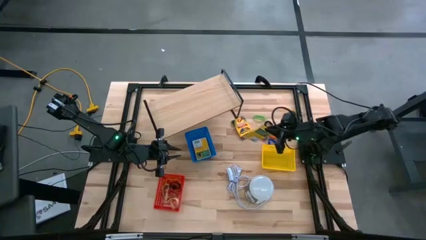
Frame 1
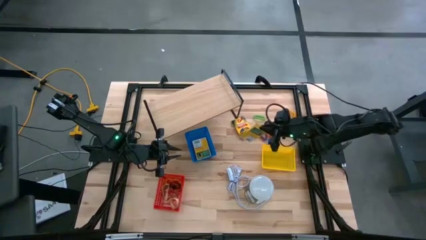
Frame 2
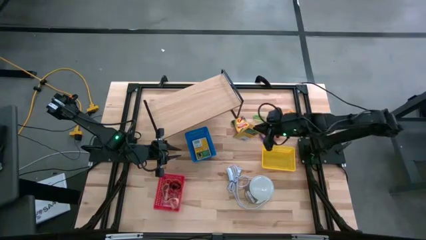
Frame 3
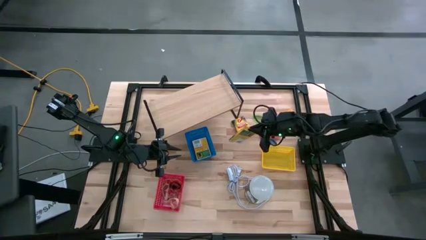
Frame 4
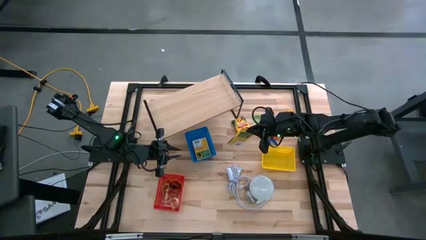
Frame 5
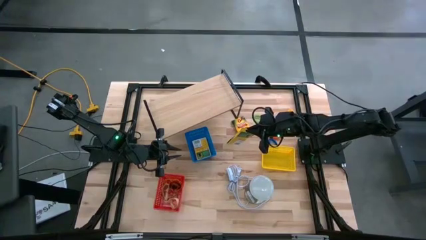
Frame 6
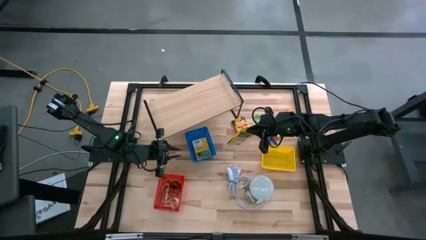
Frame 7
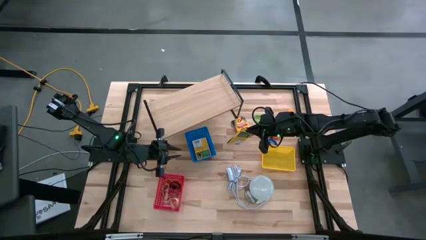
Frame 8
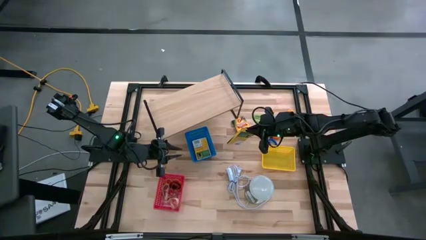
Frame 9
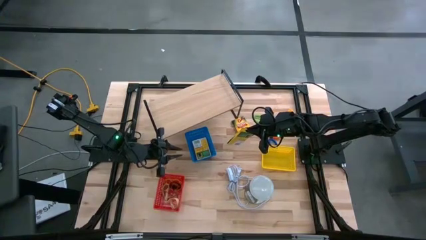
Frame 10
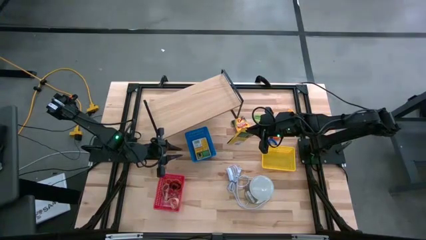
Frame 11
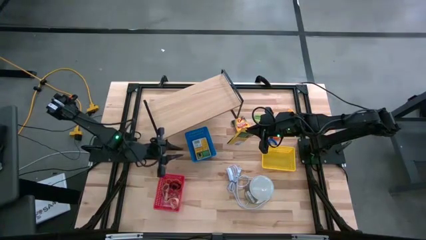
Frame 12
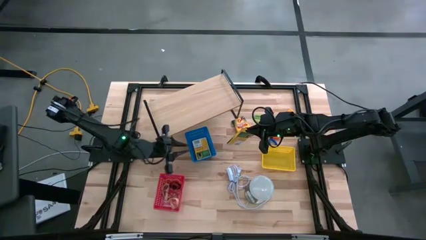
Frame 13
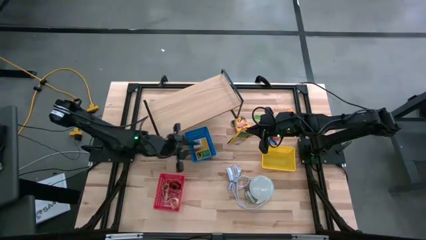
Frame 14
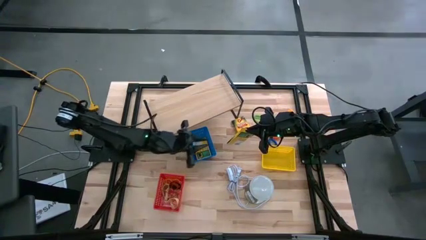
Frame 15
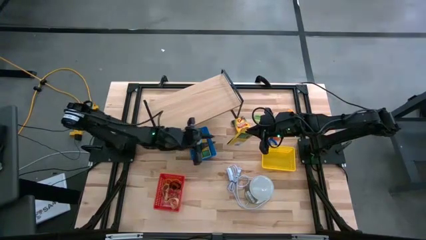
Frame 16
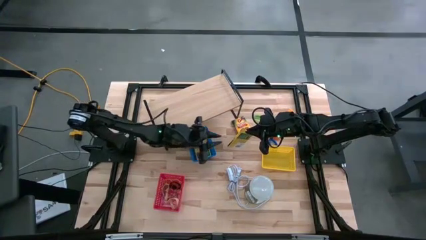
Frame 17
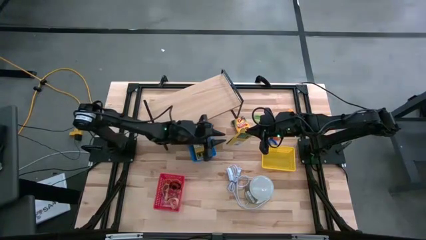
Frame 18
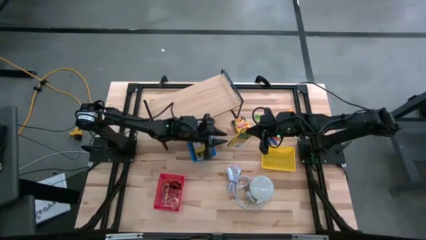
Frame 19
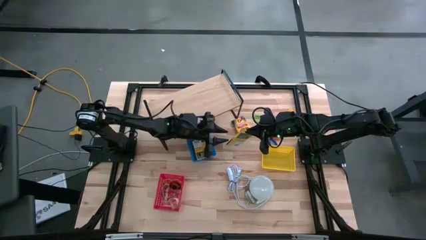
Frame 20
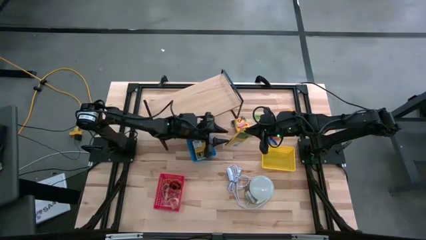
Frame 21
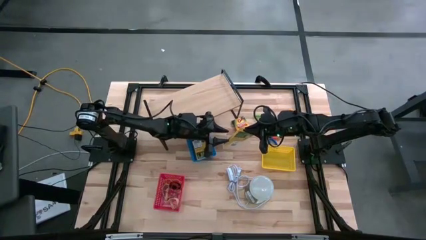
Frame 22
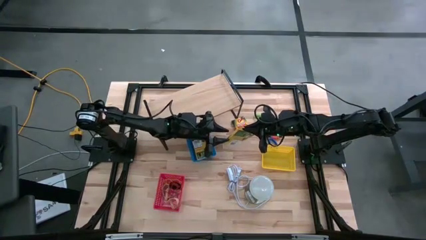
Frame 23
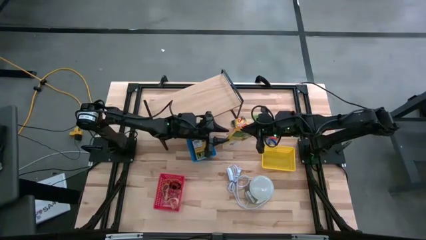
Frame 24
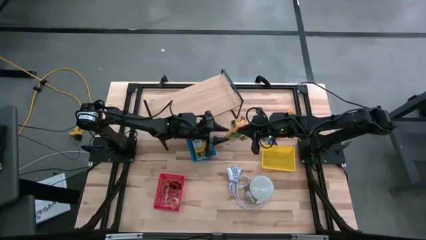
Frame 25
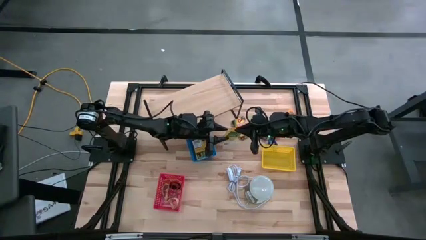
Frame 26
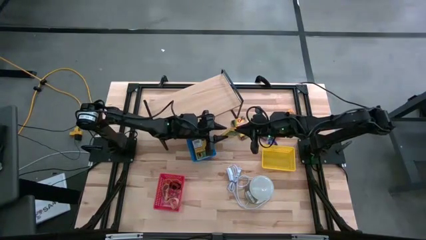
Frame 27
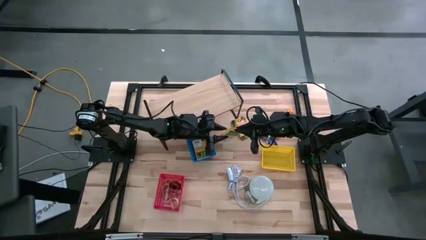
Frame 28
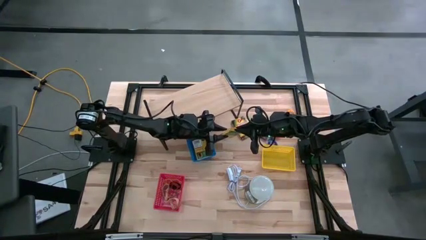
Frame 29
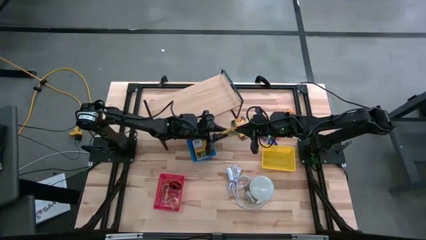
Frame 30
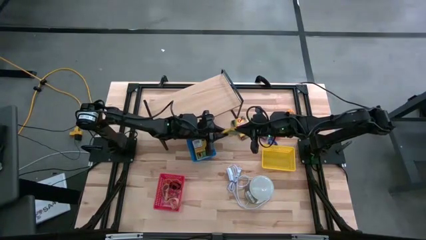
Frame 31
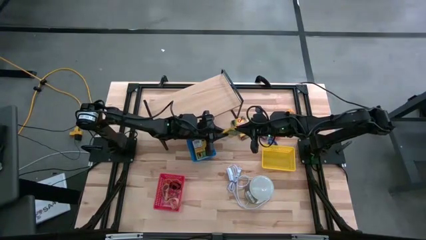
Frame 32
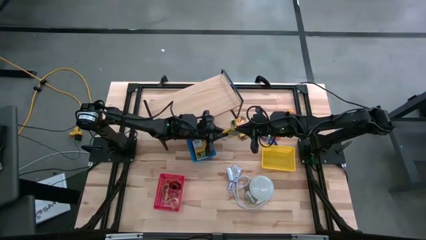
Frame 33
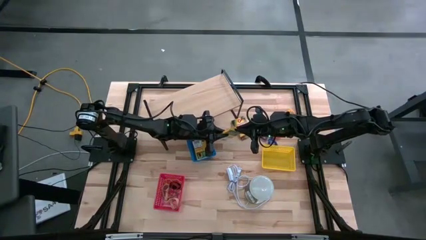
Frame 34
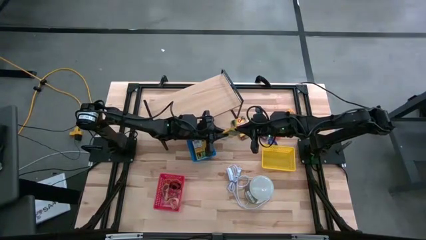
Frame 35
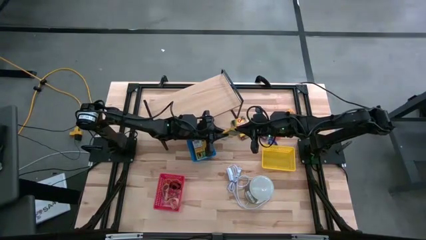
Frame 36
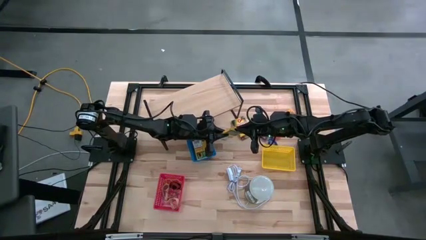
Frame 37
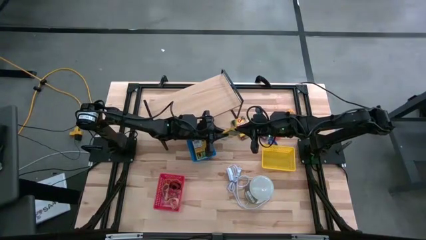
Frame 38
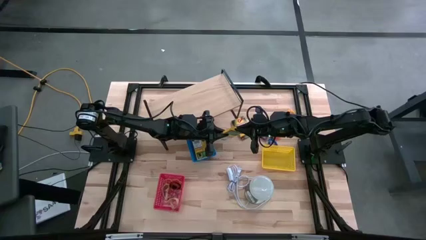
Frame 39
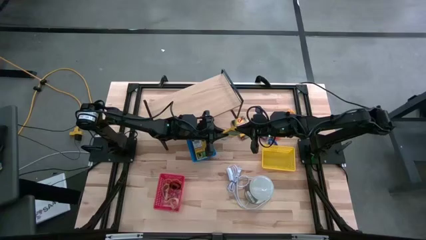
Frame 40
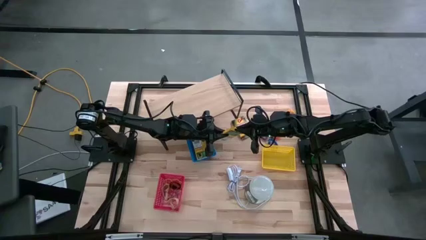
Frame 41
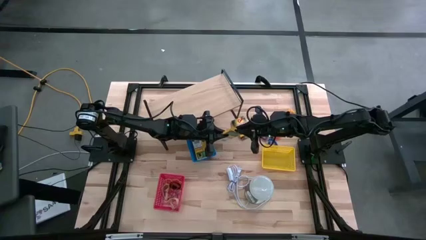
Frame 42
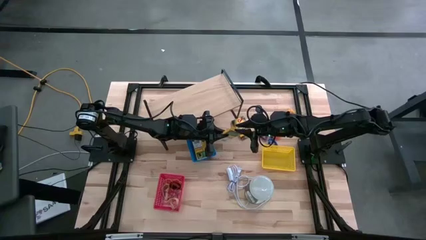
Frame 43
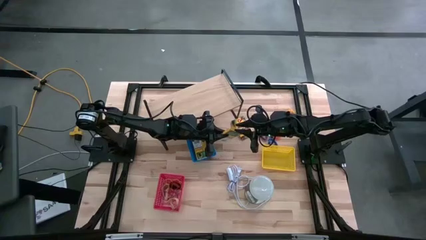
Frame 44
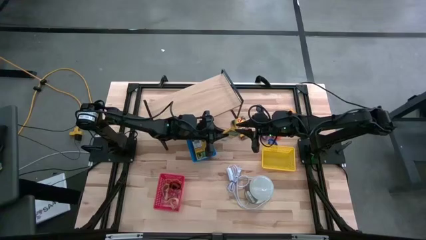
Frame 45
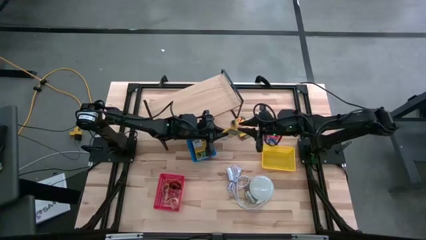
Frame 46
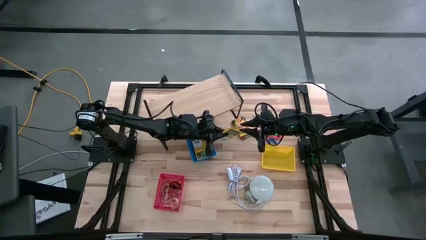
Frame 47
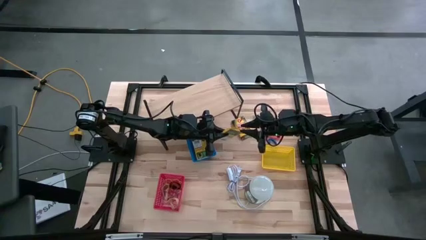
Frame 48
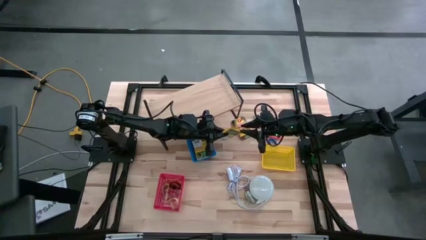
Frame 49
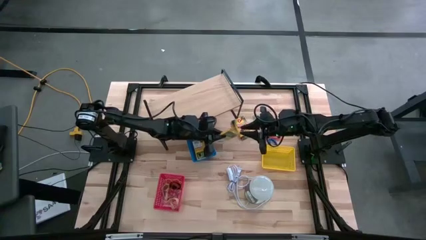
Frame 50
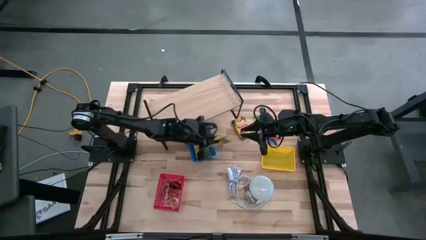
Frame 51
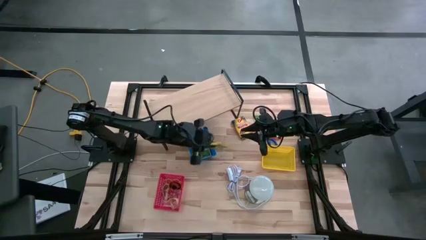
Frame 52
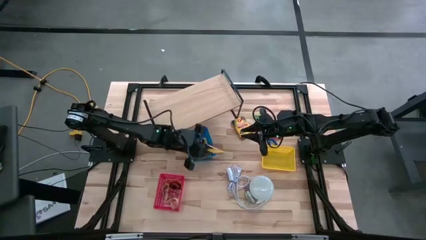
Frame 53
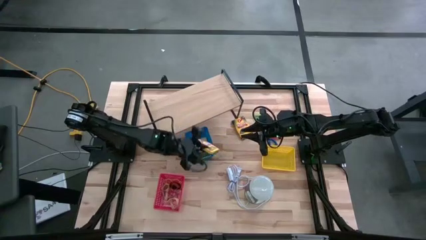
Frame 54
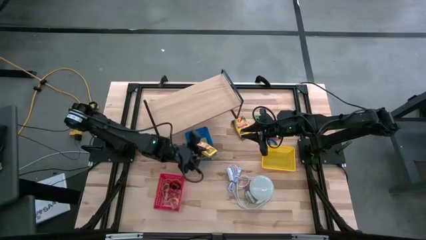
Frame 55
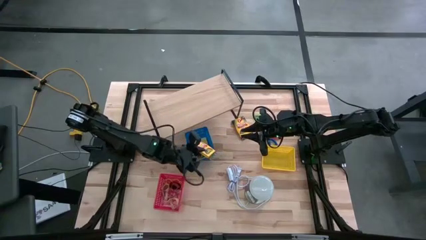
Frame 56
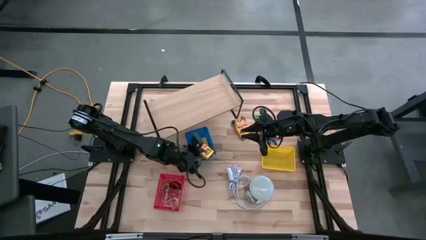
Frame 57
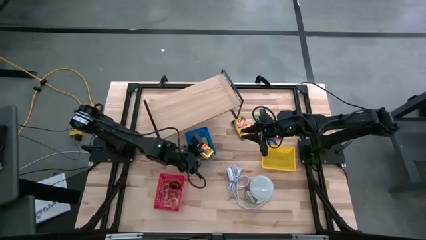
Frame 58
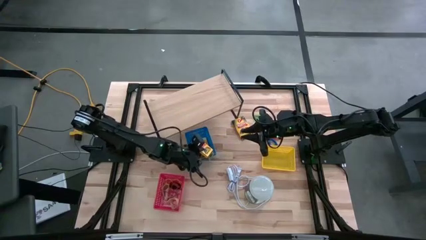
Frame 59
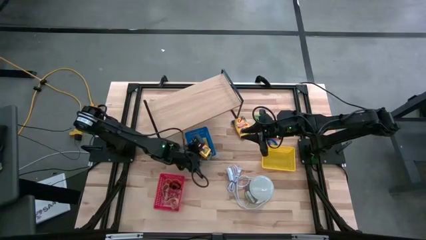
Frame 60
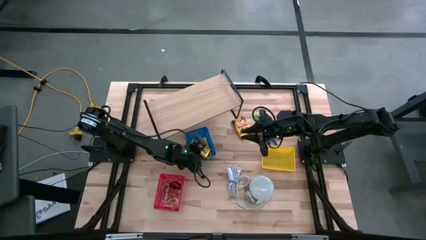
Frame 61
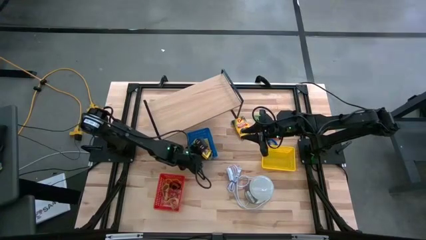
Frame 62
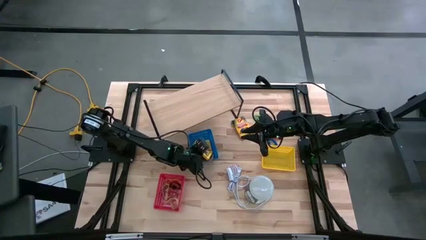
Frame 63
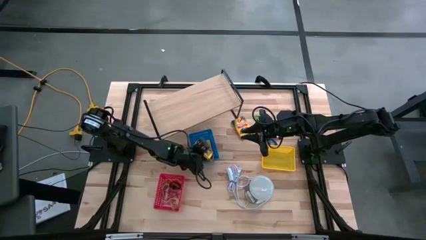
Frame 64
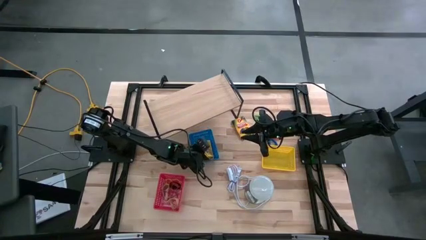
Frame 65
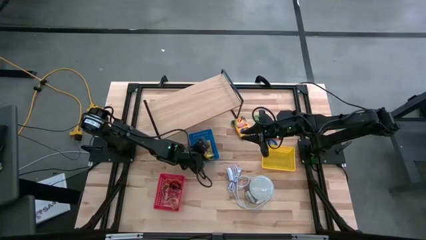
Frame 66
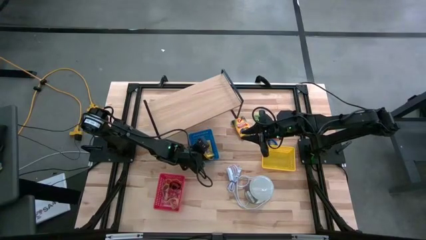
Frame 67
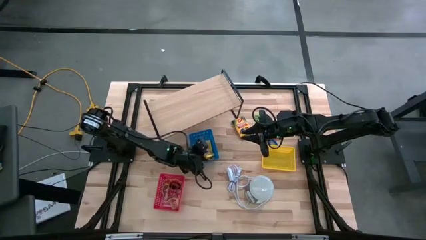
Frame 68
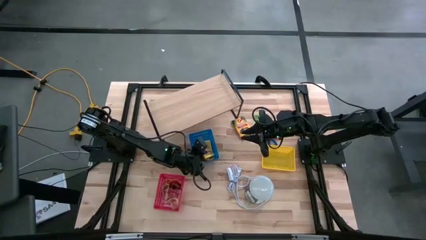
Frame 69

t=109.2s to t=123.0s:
Task: Pick & Place Office Desk Supplies
Put the yellow pack of crayon into the blue bin

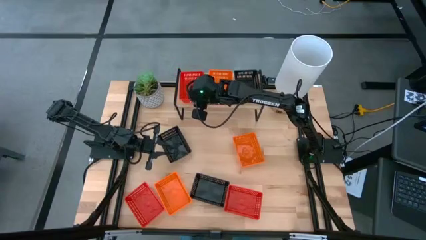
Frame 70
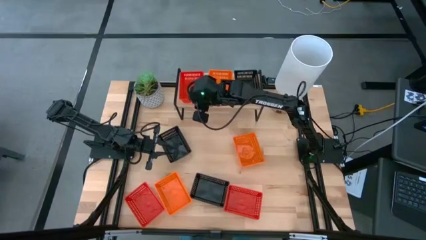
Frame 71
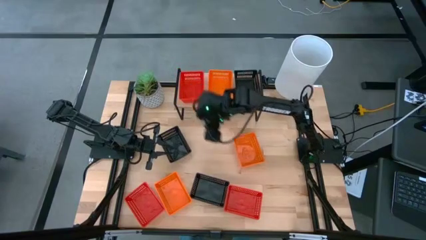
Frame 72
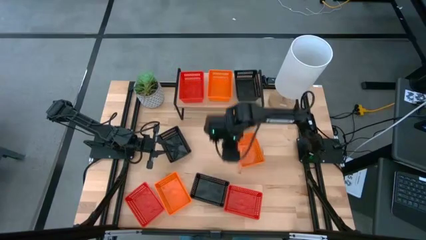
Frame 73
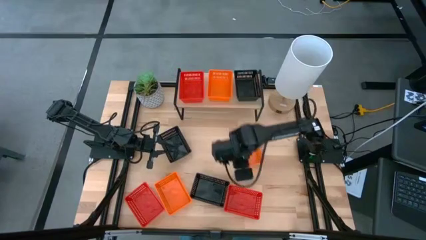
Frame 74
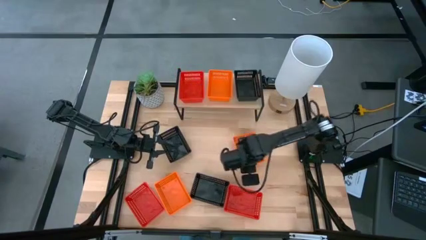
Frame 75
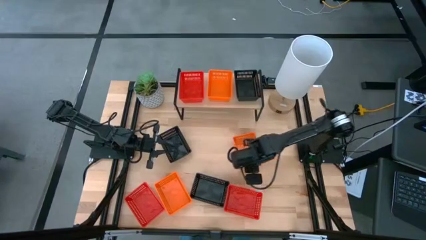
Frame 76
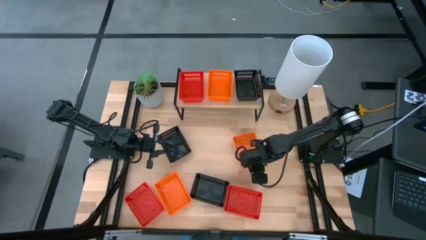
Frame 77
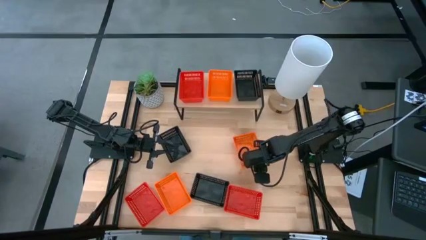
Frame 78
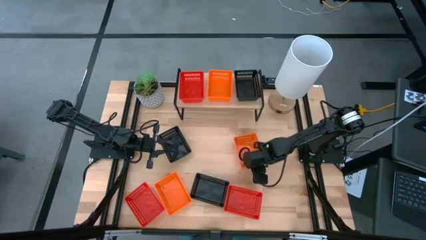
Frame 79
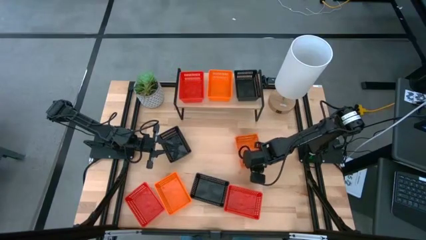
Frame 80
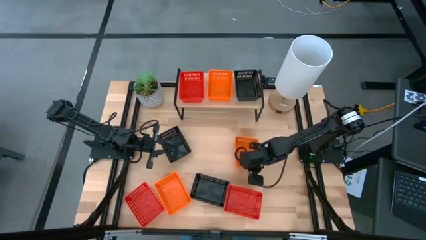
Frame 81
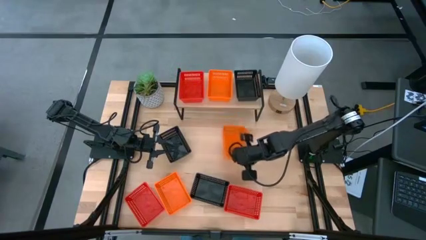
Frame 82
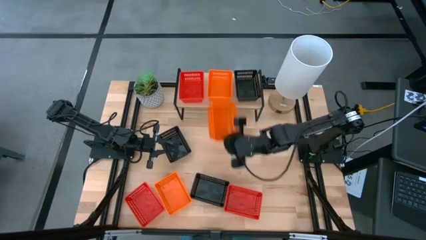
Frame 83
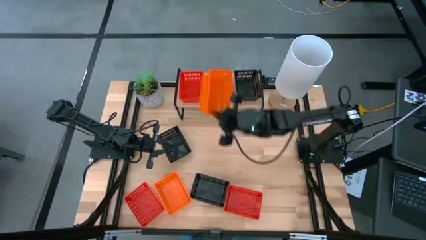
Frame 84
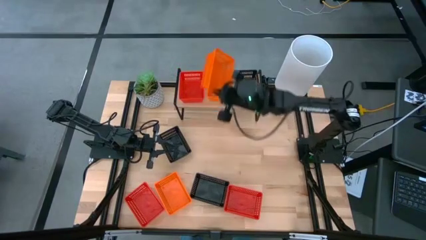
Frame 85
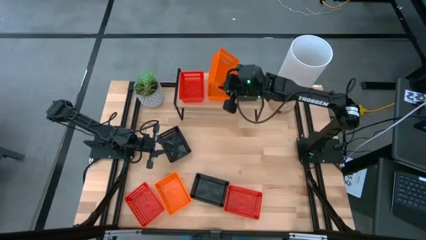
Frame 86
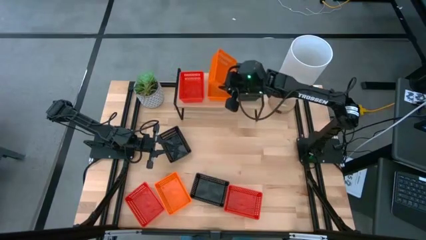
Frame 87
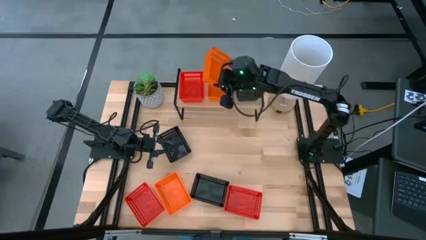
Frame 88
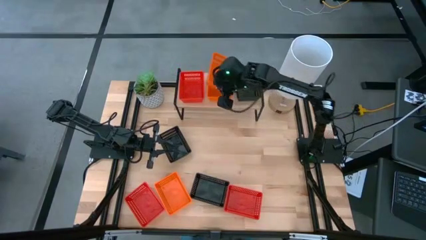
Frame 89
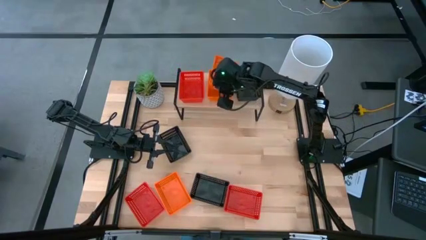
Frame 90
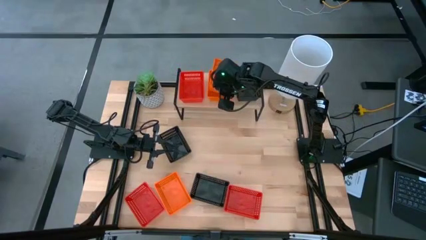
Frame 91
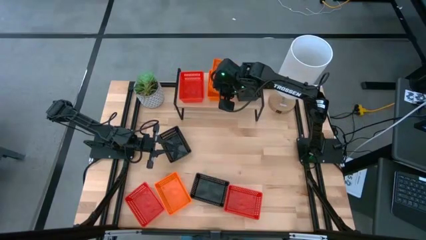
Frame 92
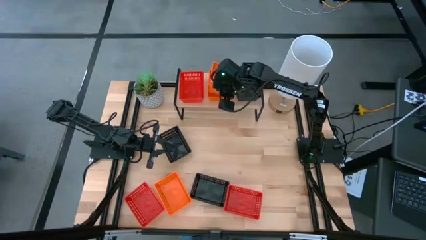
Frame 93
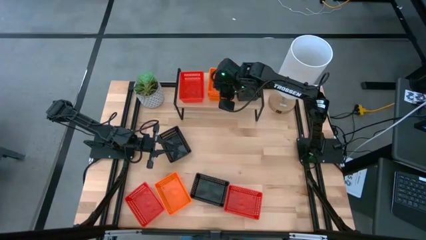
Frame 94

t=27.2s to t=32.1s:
Task: Stack baskets on shelf by color
Stack the right orange basket on the orange basket
